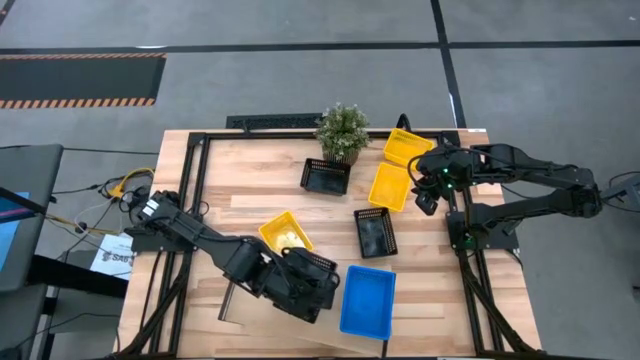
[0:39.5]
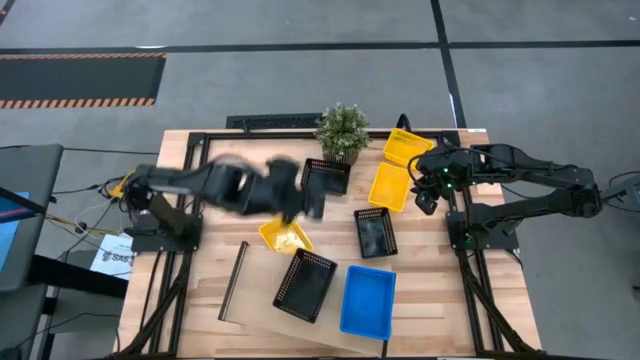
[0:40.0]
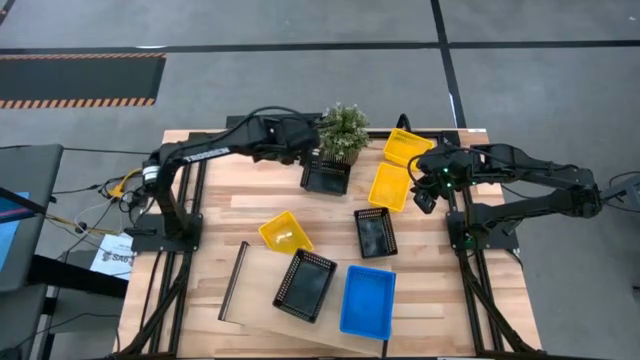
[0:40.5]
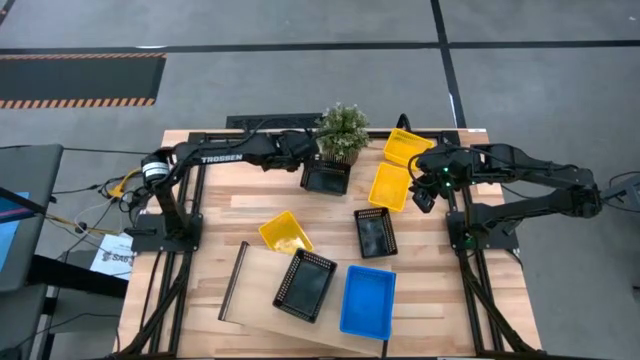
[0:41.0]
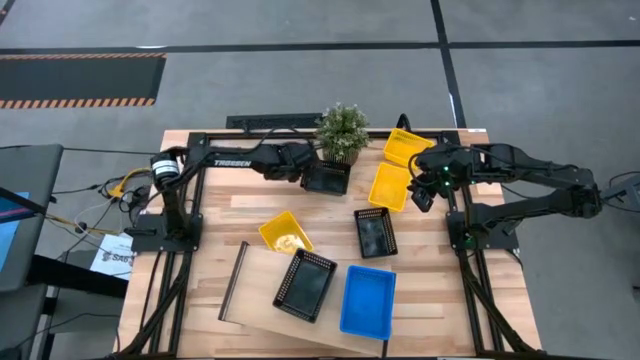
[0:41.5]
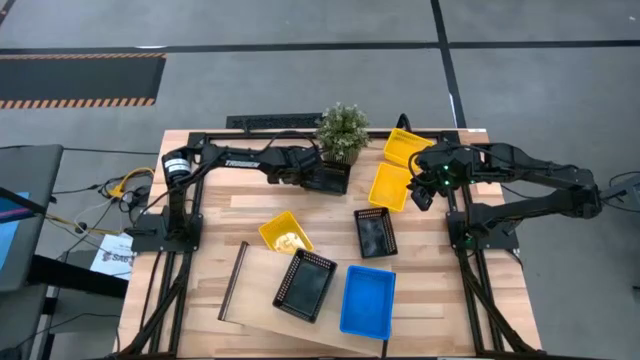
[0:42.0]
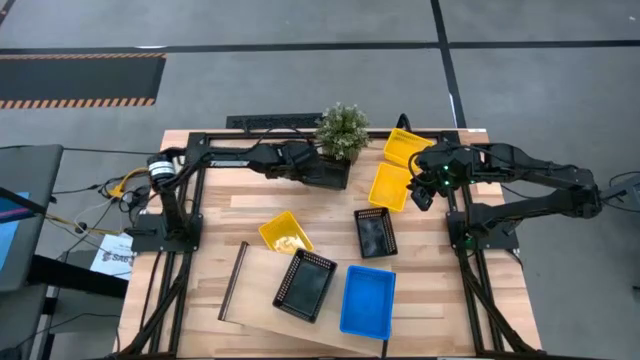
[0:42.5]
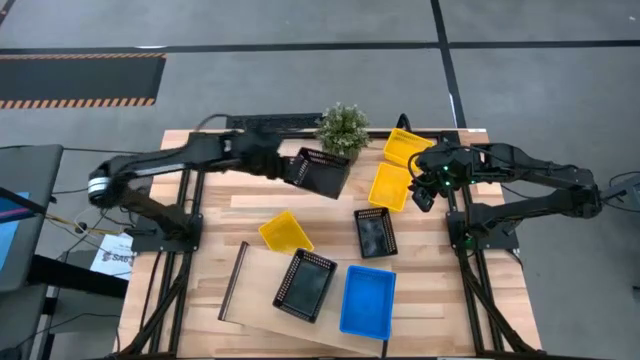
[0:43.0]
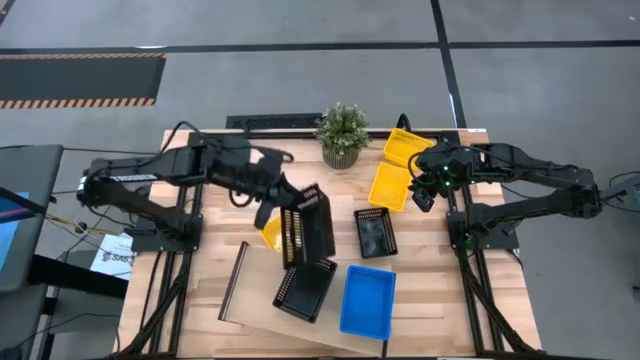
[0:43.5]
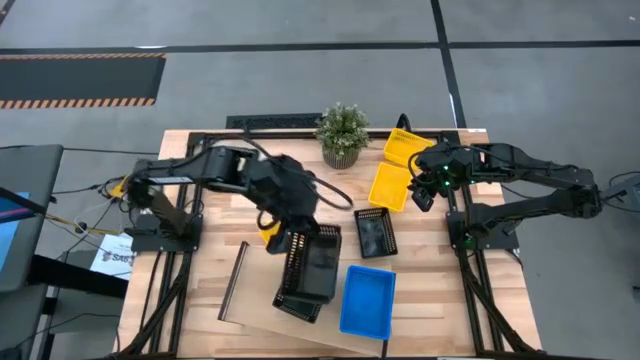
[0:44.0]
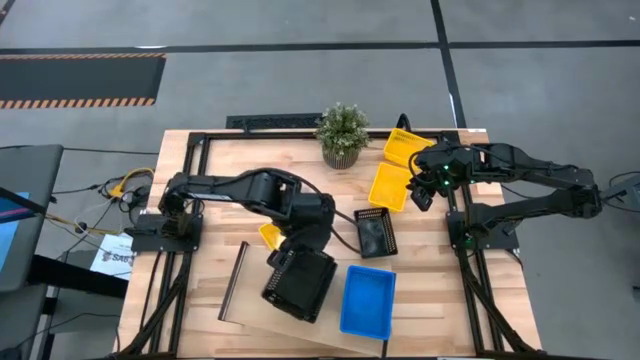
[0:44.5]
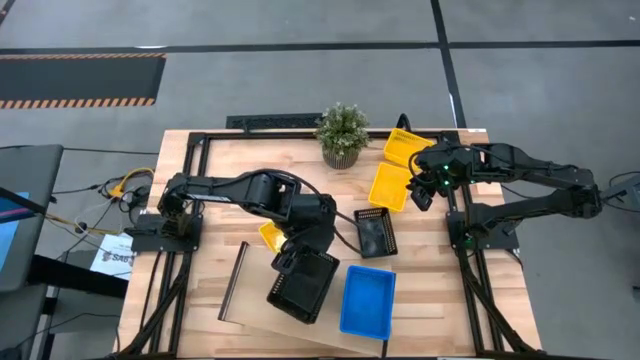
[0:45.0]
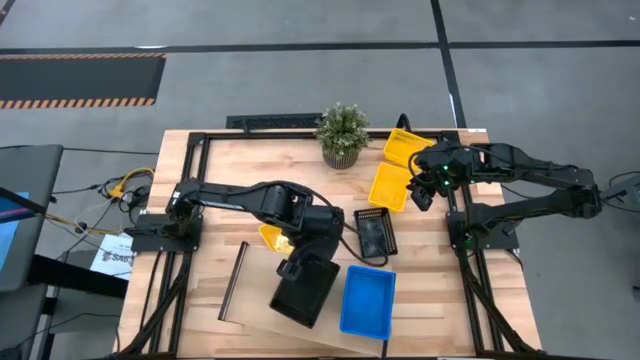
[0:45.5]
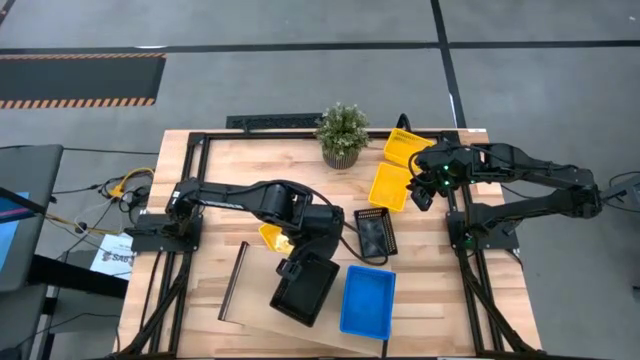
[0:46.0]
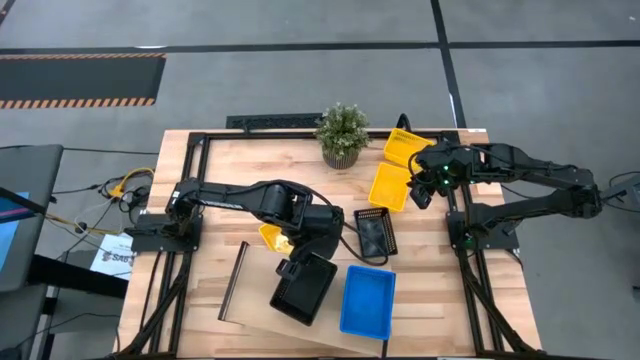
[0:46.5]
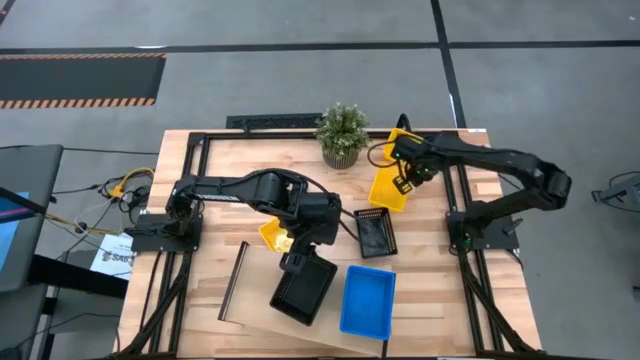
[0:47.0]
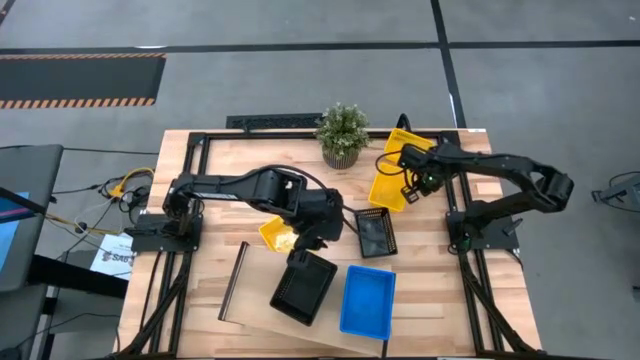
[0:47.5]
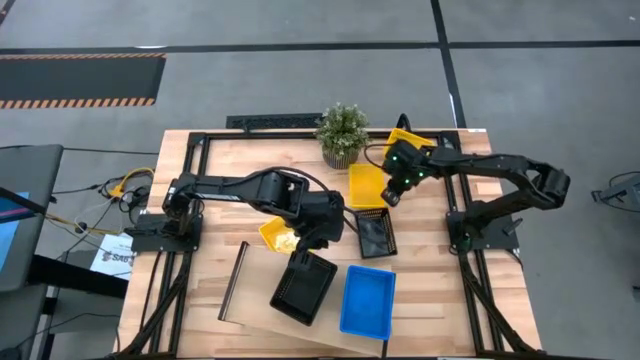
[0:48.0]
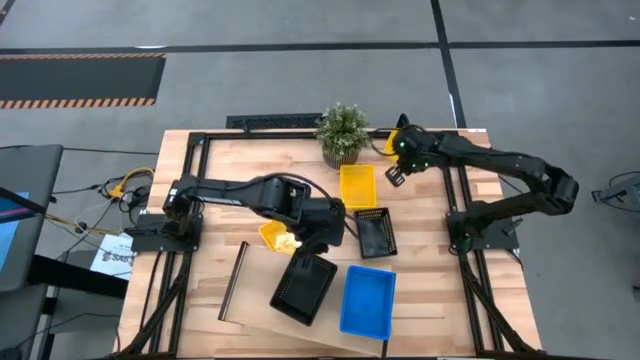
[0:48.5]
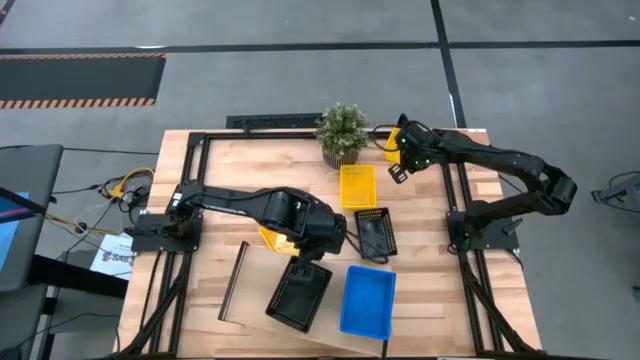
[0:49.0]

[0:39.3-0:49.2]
Task: Stack baskets on shelf by color
Stack the top black bin on top of the black bin on the shelf

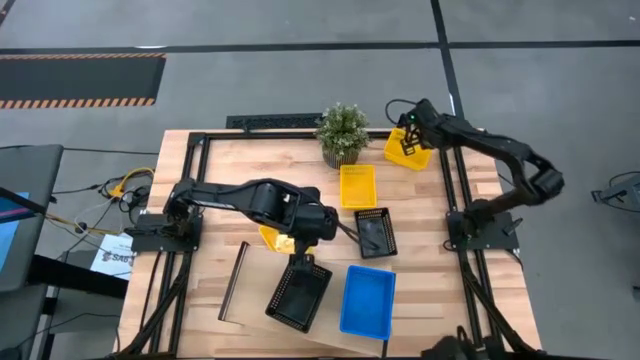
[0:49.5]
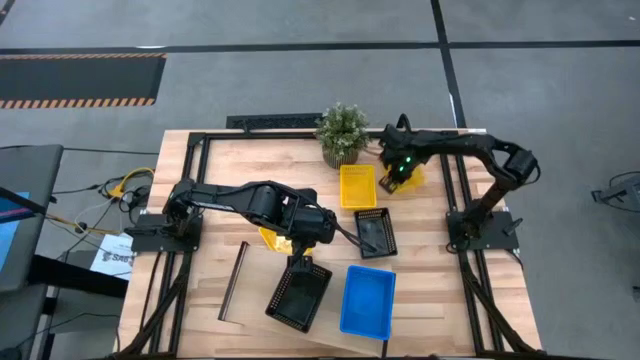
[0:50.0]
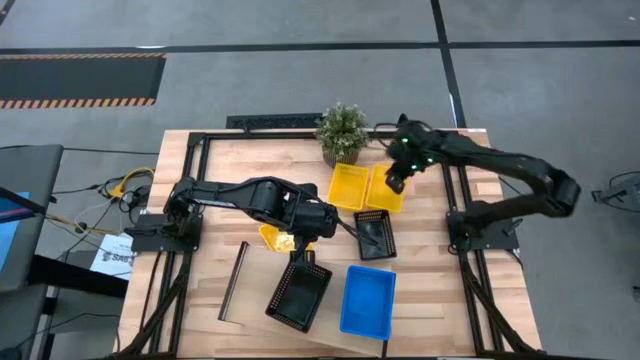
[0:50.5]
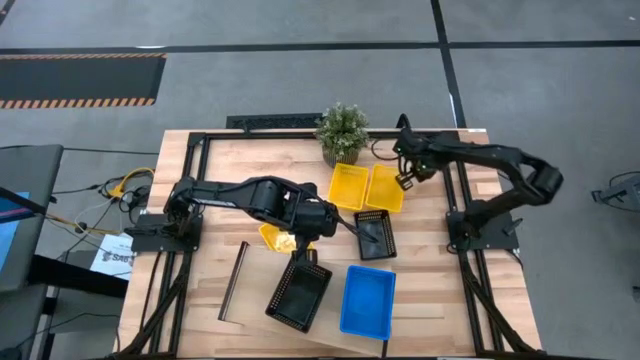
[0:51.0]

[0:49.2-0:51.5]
Adjust the yellow bin

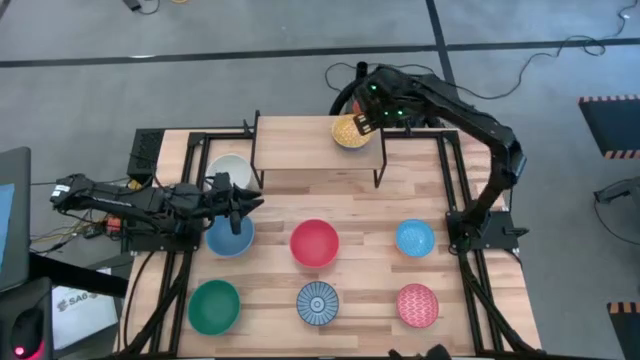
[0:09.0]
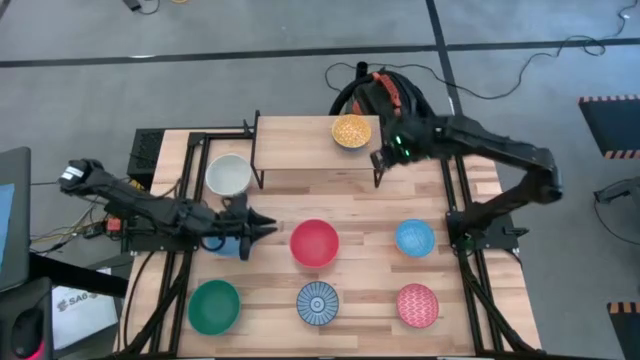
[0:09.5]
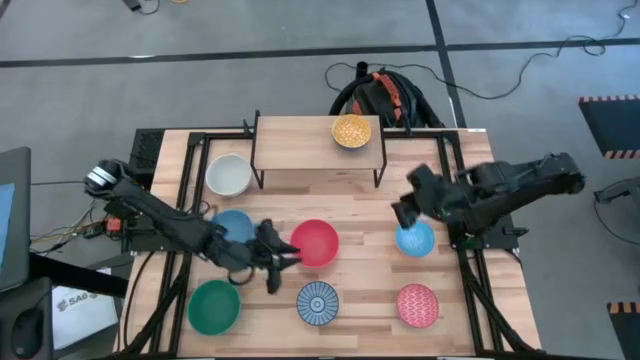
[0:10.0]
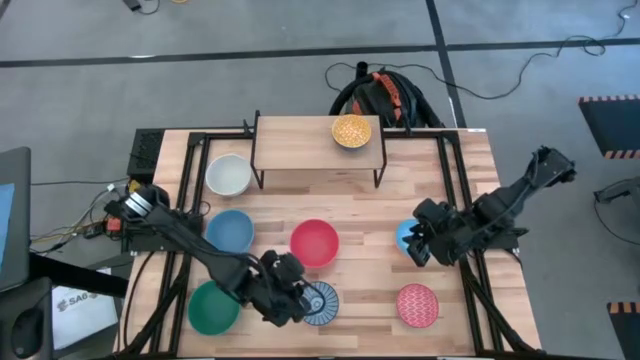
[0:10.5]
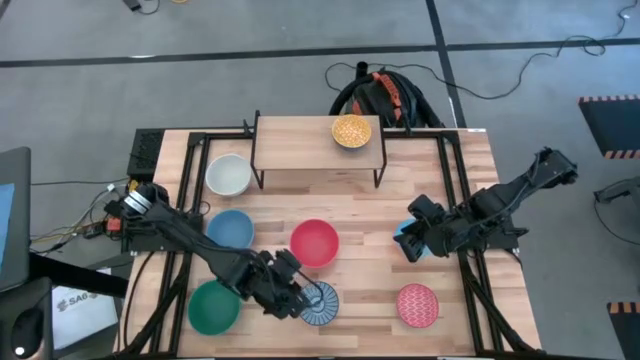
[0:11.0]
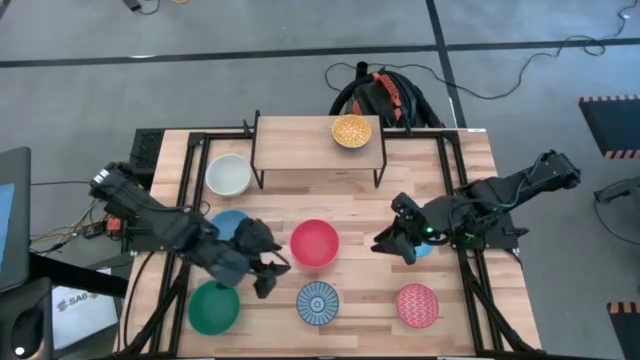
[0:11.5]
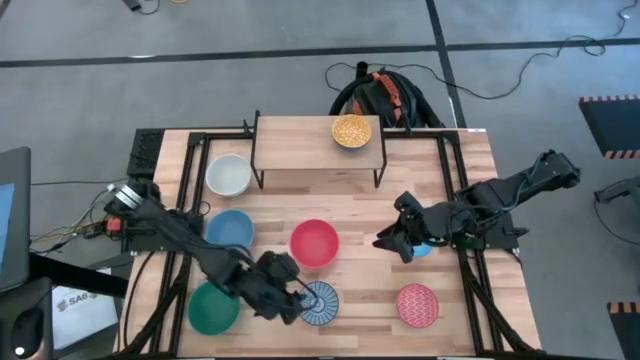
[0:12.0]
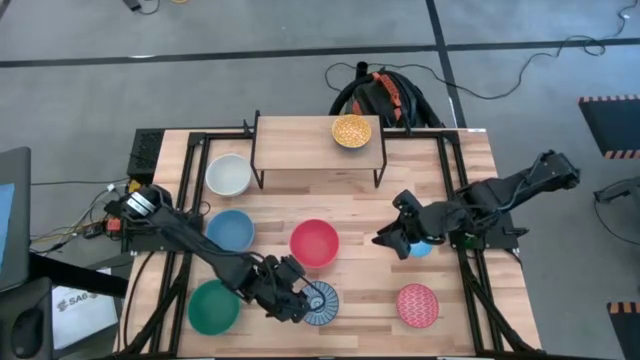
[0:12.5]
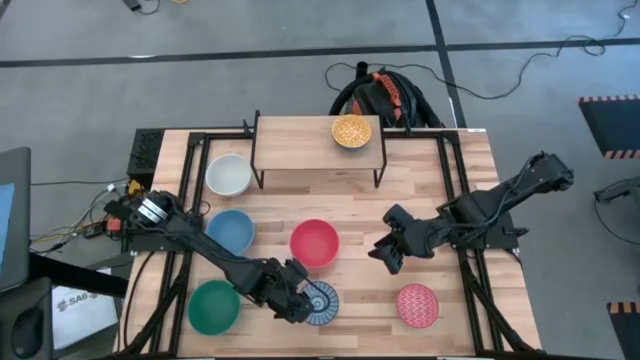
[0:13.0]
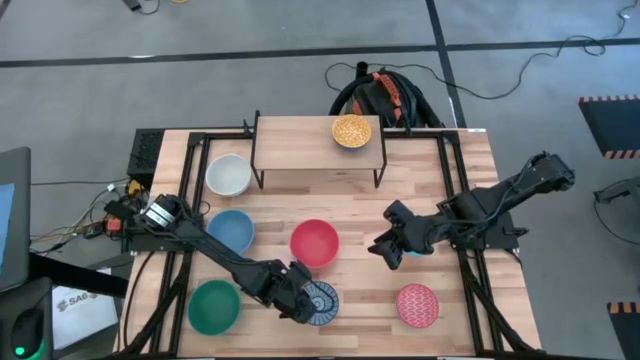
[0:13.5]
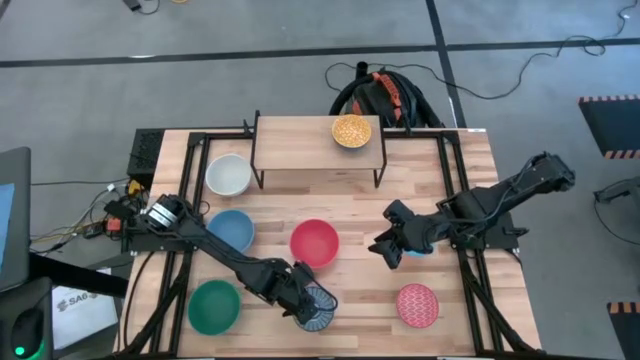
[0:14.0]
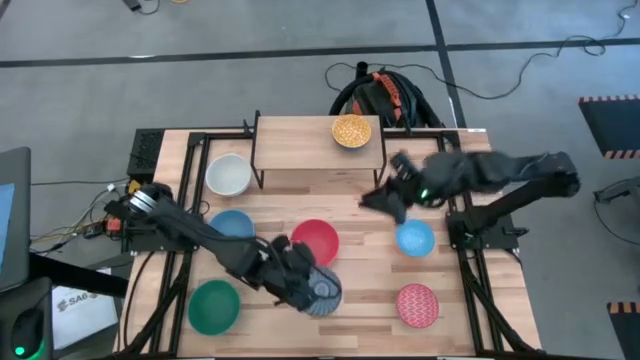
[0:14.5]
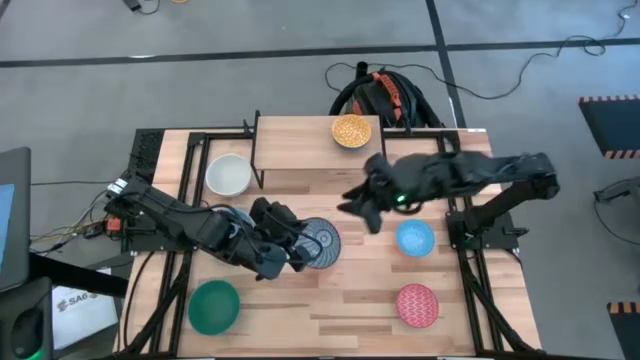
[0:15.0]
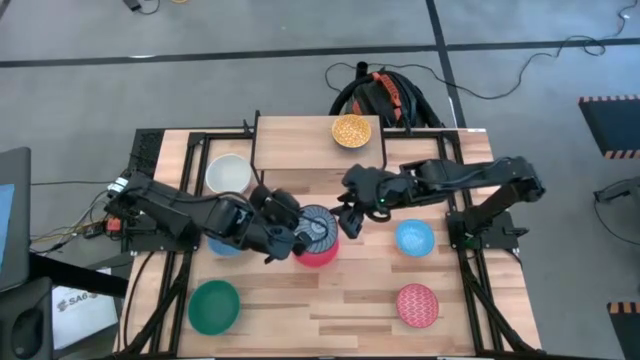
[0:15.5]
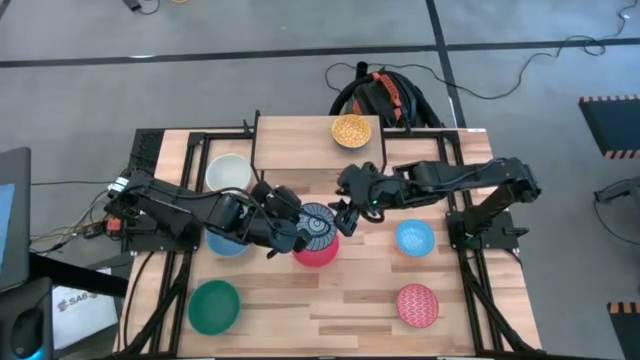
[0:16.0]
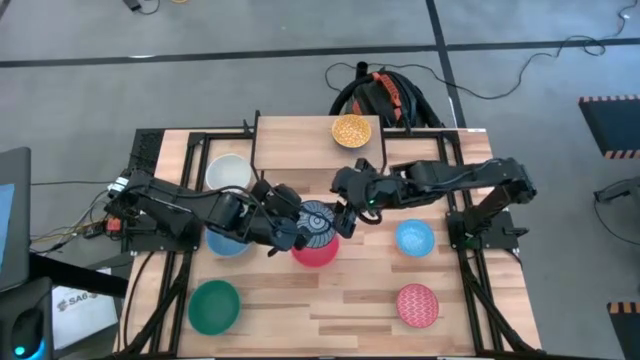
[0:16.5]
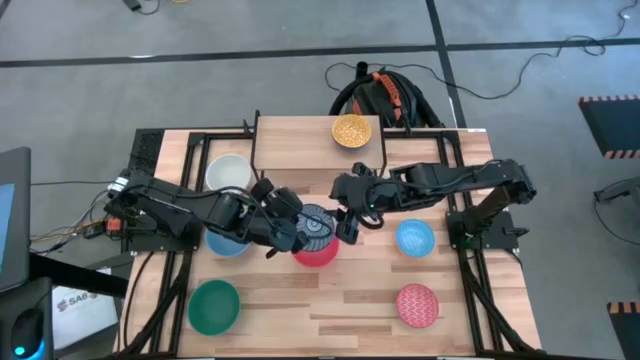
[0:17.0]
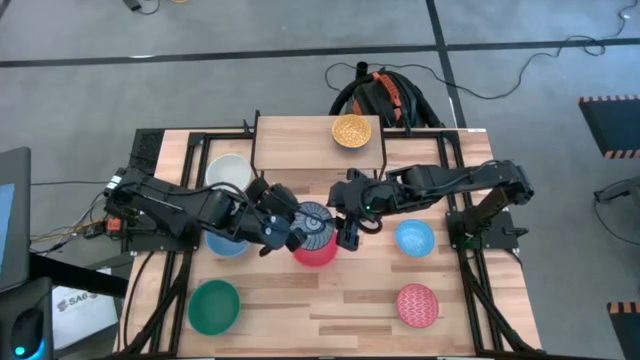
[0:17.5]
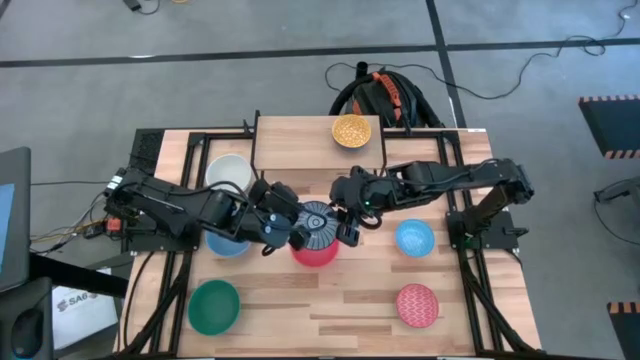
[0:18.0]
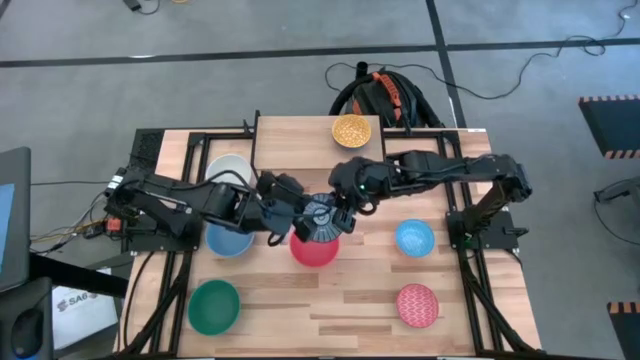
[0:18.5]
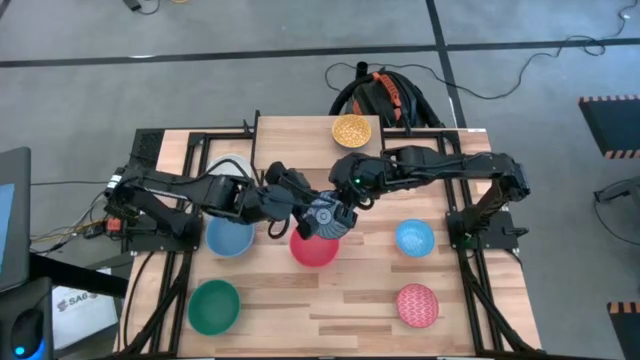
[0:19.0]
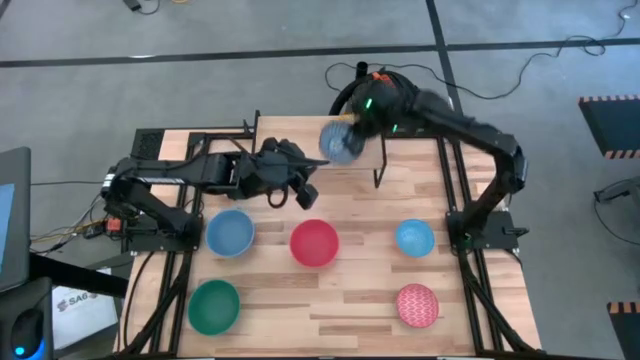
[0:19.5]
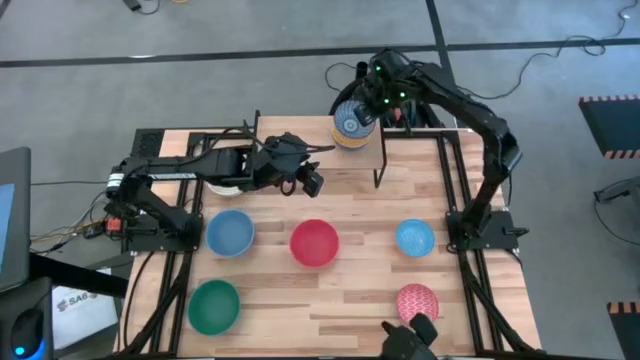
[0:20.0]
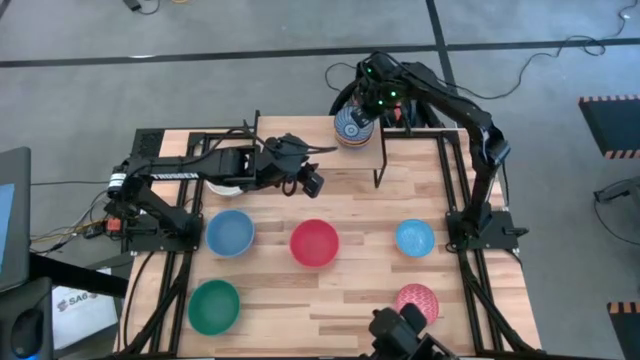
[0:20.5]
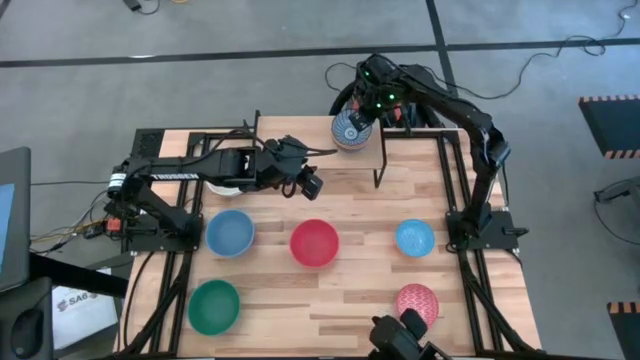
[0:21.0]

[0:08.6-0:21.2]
Task: Place and stack bowls onto a shelf
Stack the blue patterned bowl on top of the yellow bowl on the shelf
